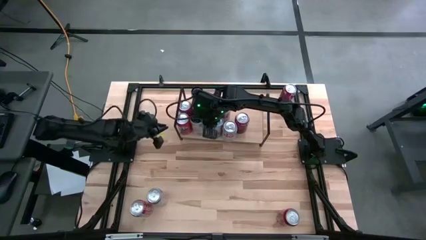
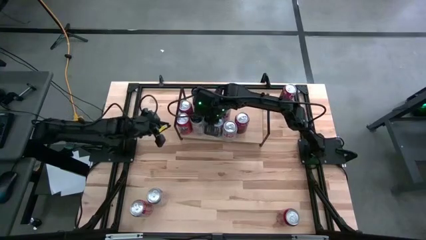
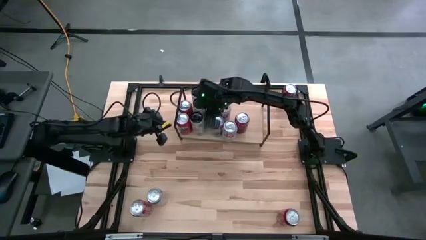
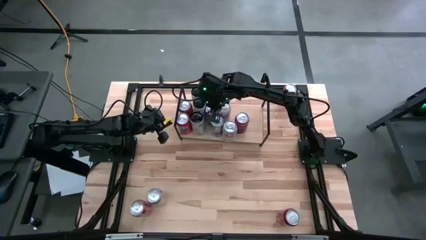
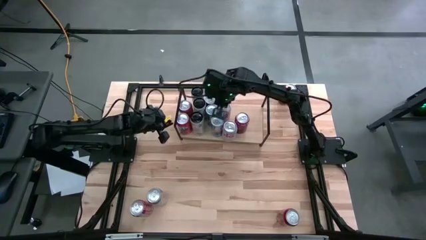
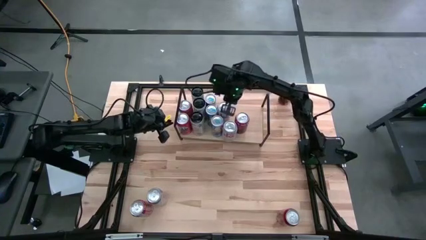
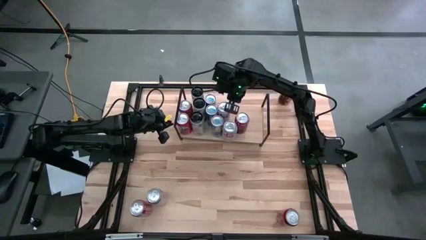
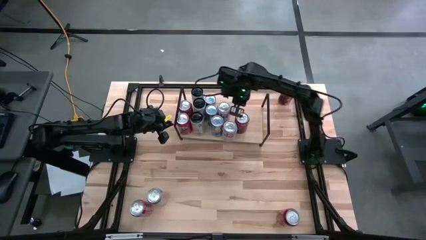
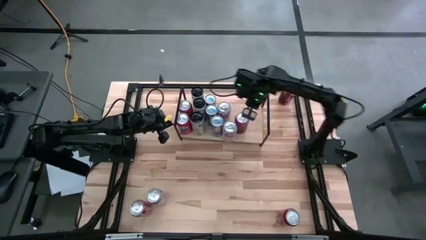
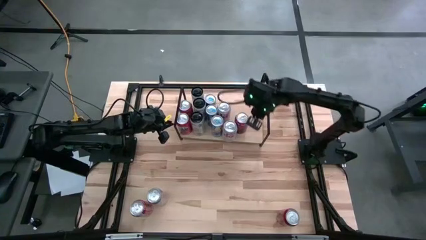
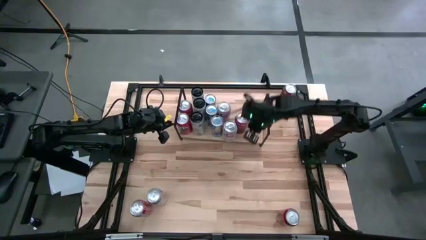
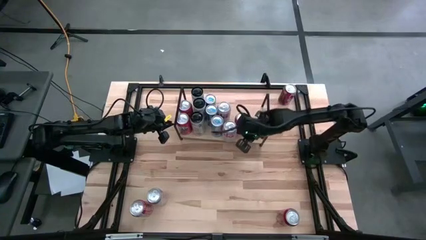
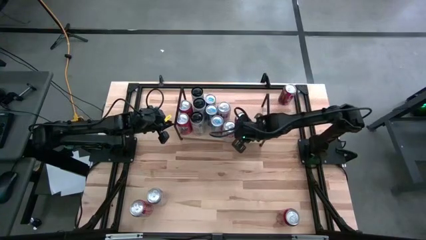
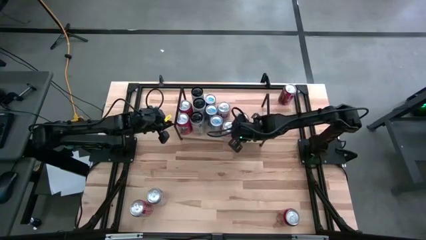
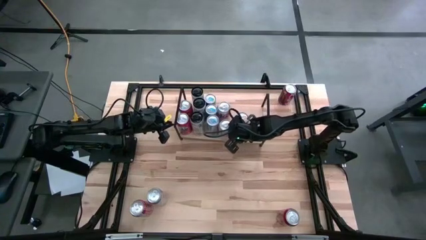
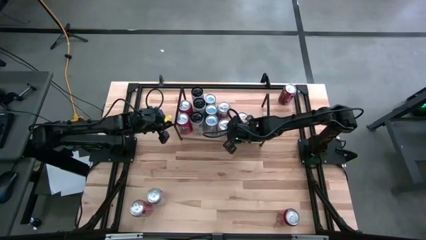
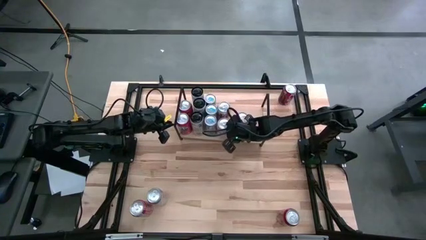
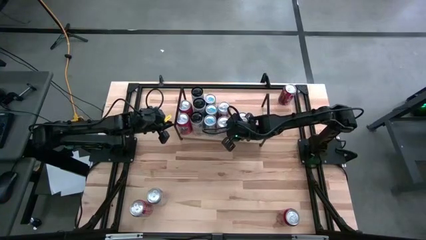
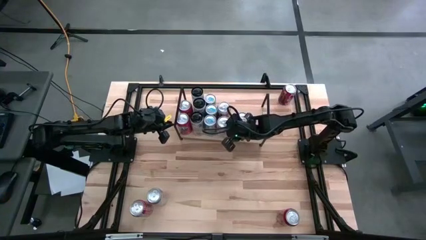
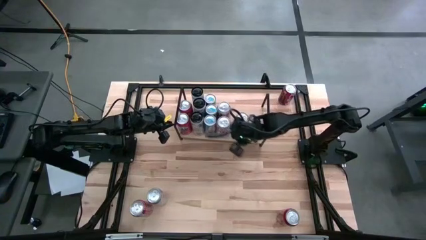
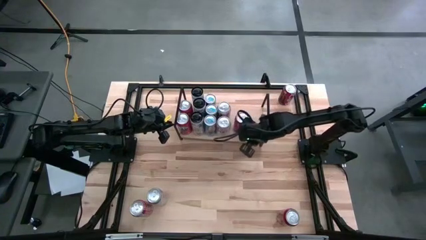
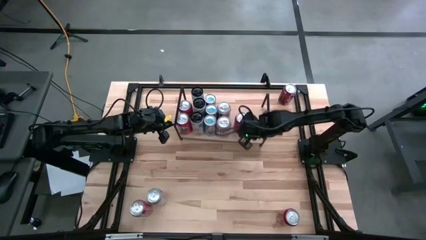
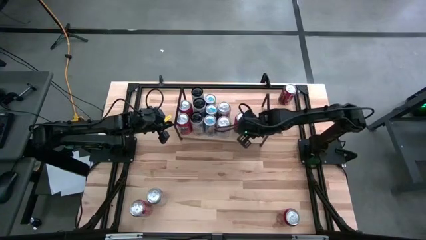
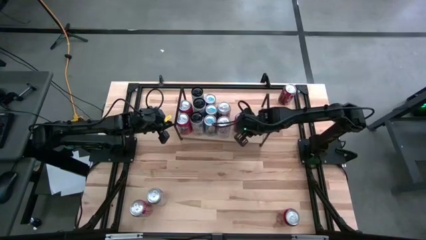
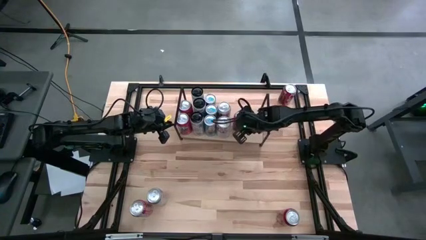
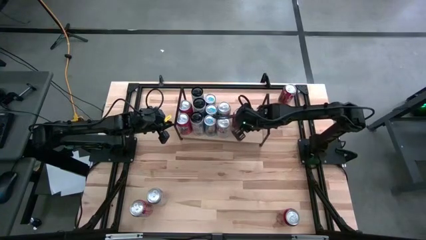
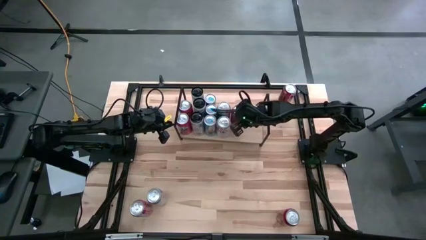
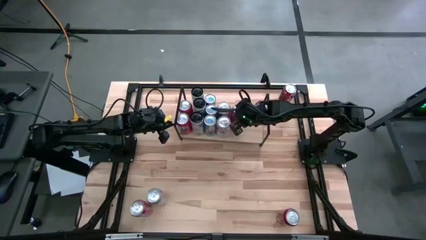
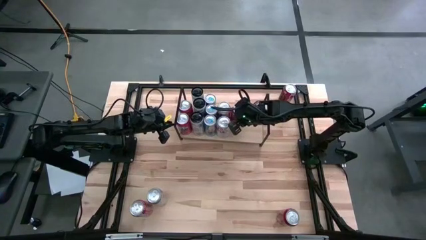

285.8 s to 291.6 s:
Task: Place canned beverage on shelf
Adjust the soda cans on the shelf

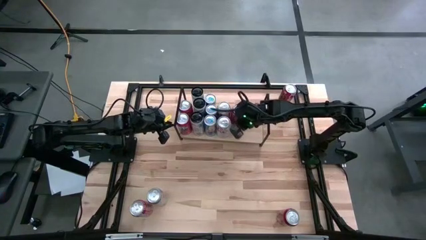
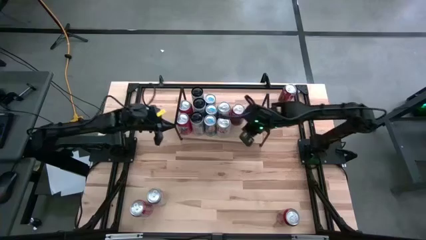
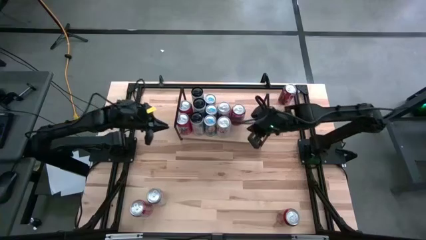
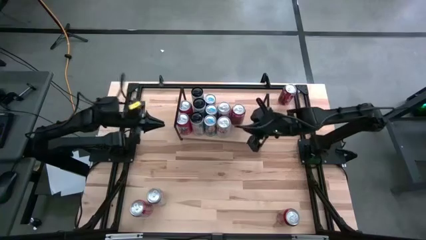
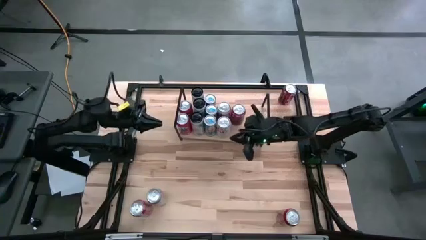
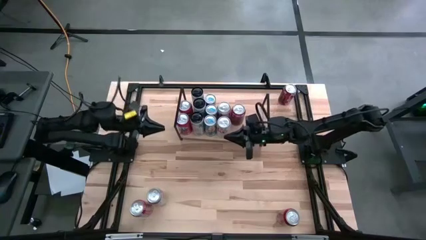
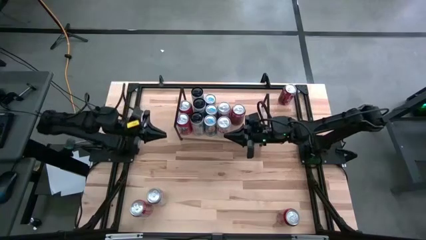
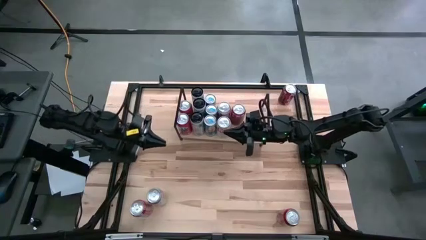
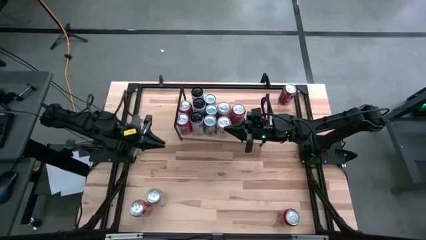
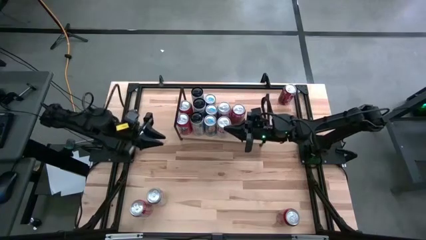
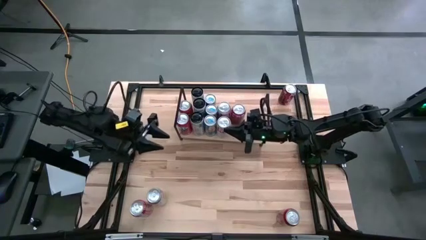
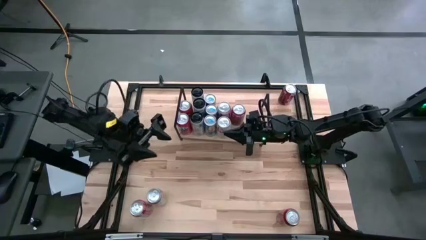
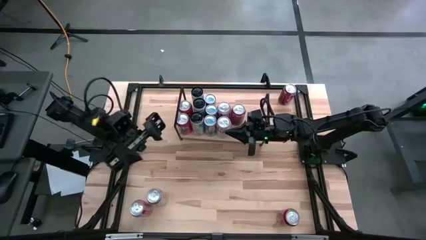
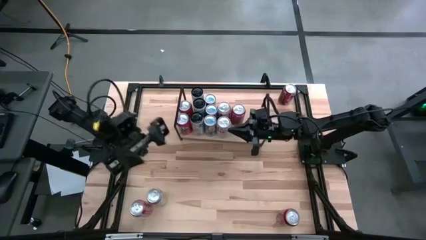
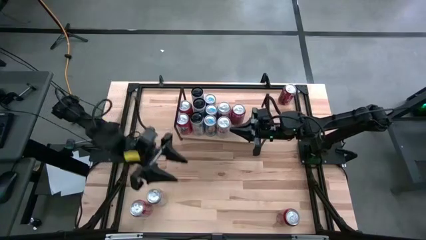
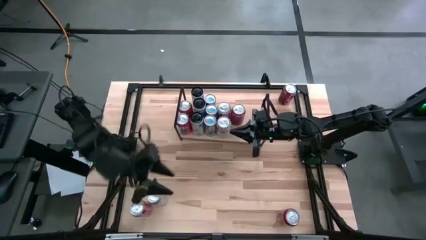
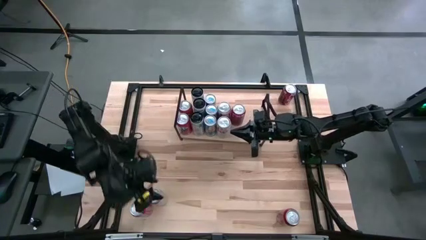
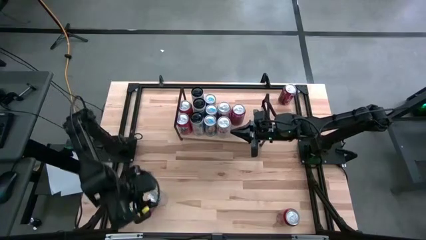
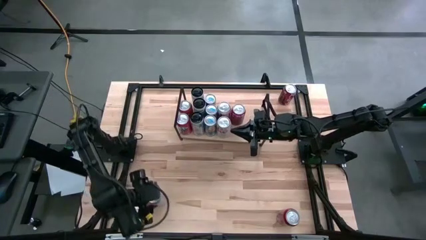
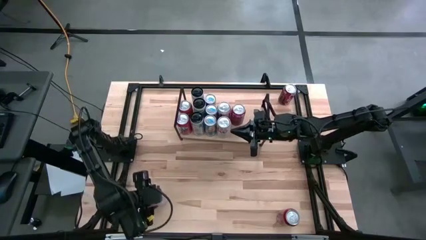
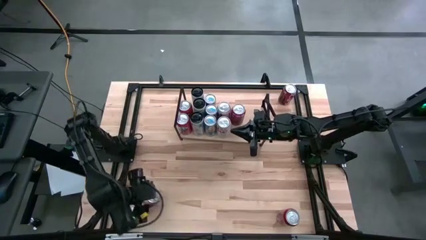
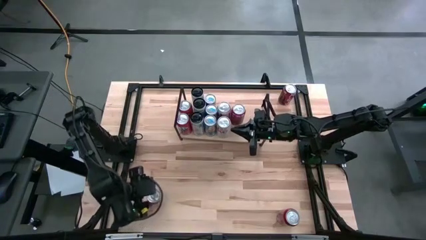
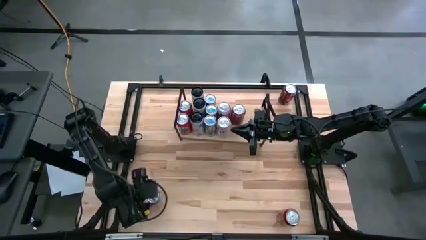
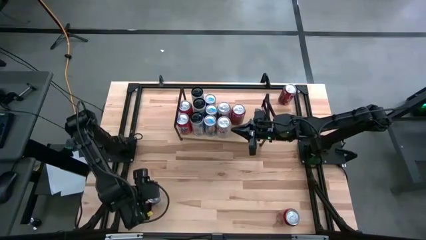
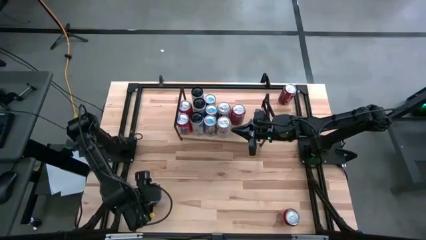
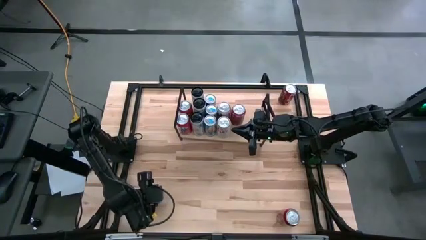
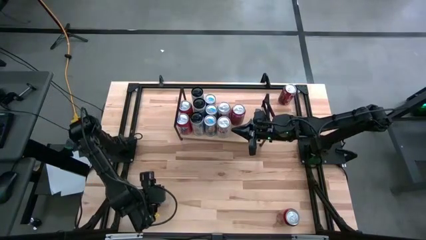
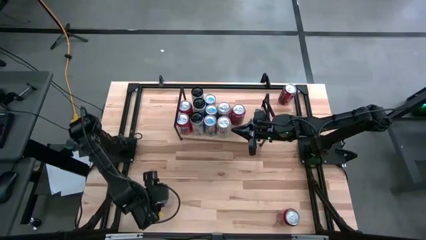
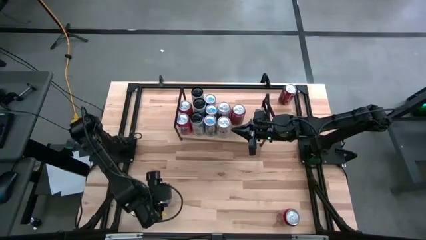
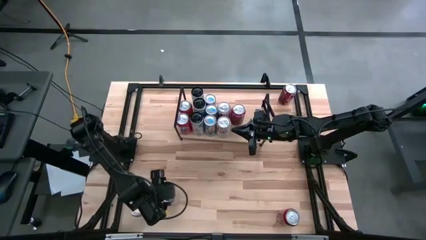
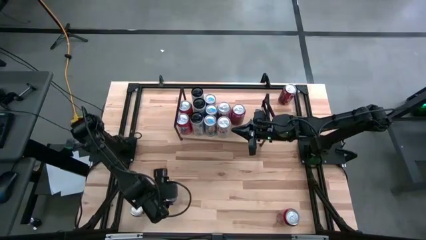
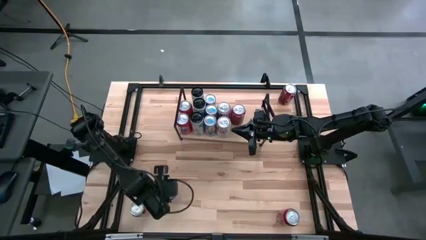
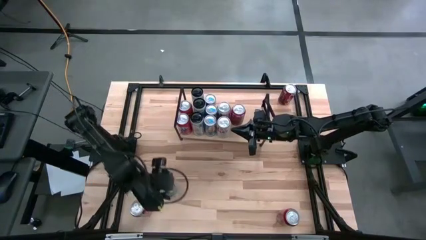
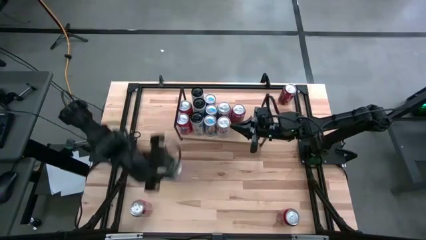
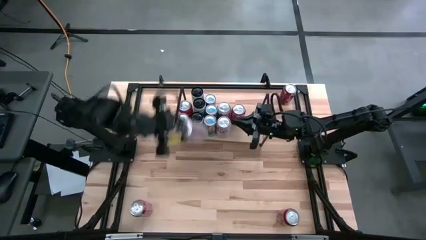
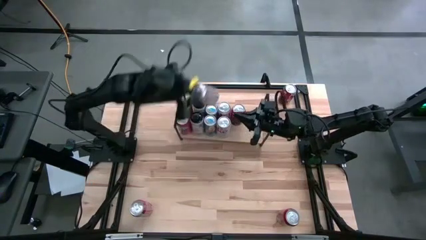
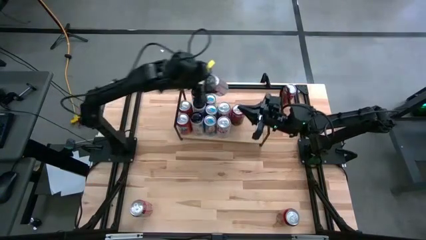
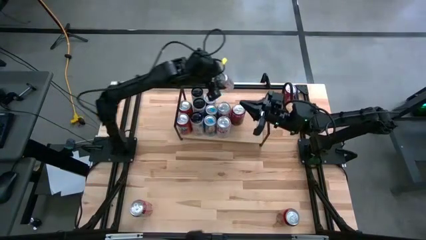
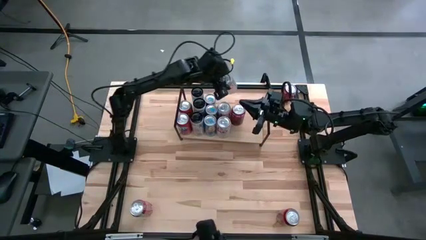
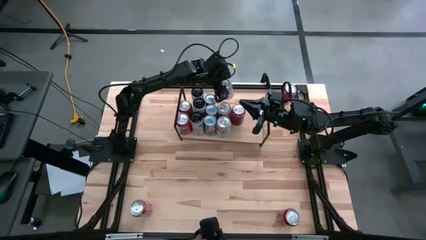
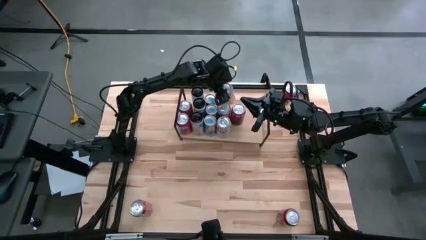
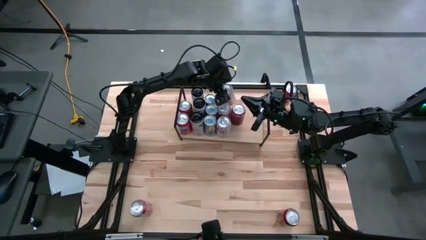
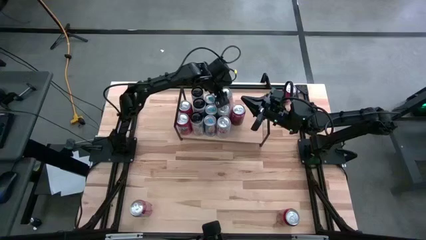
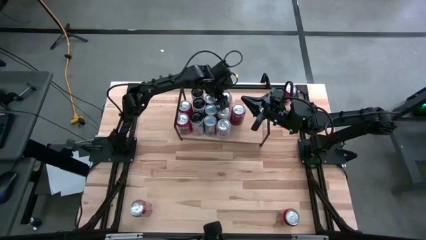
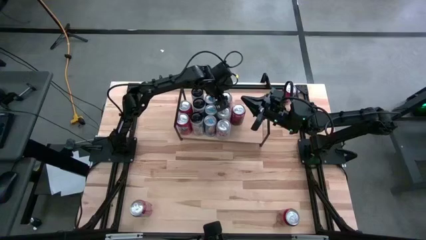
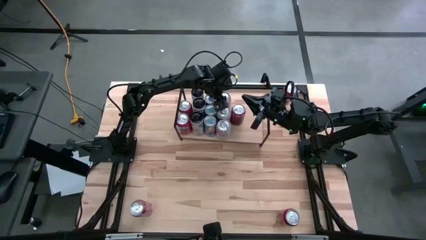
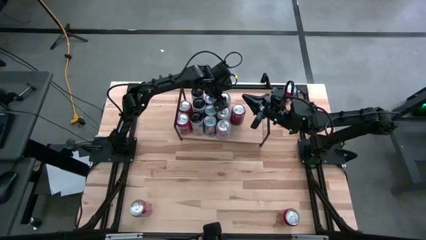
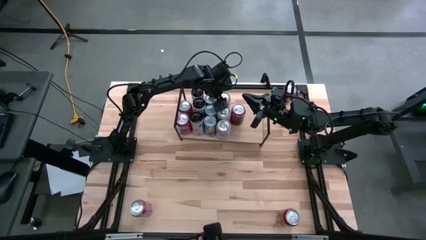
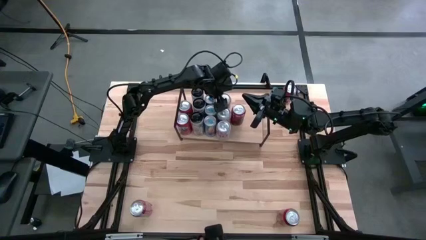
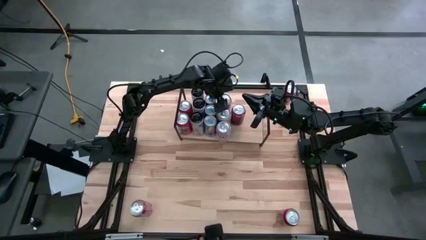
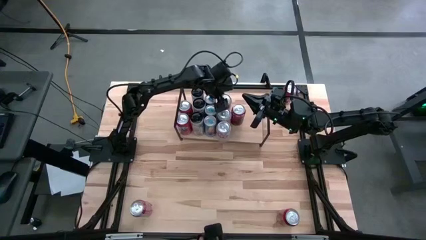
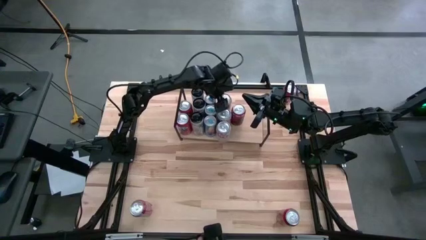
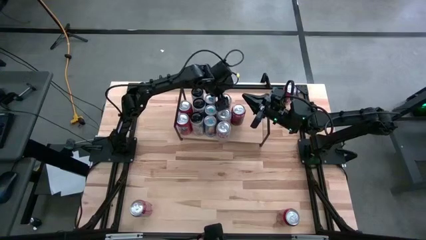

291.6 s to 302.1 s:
Put the red-silver soda can on the shelf aligned with the other red-silver soda cans
